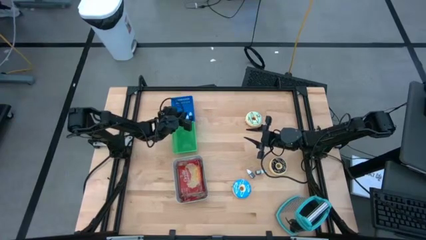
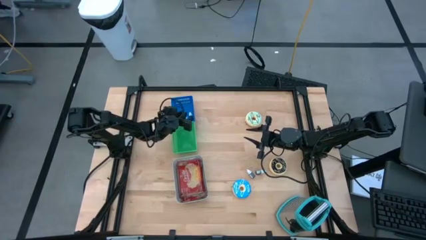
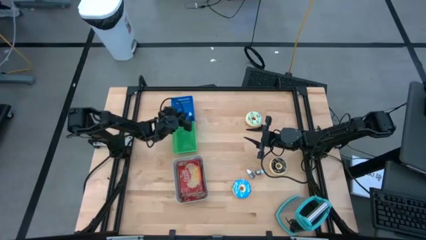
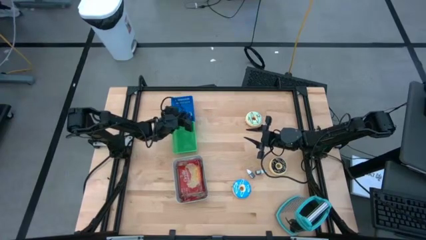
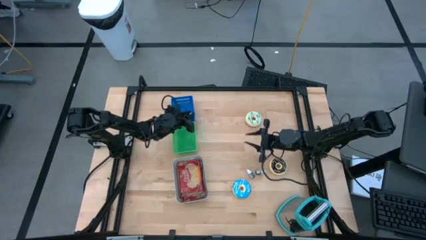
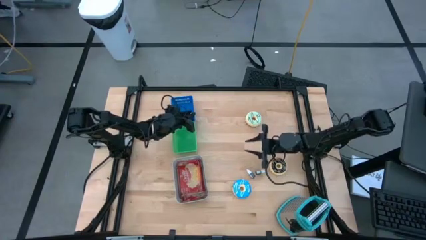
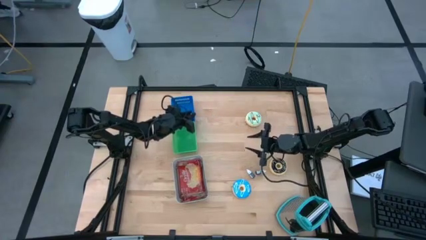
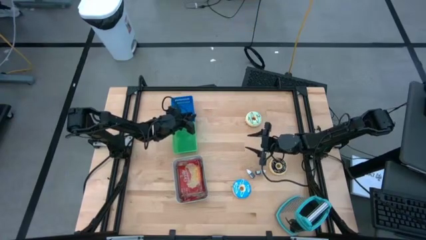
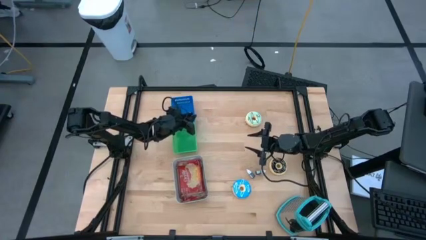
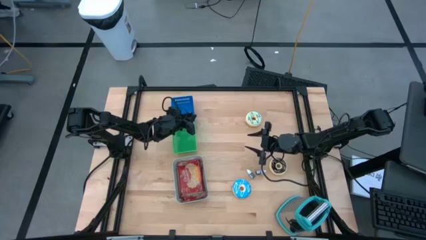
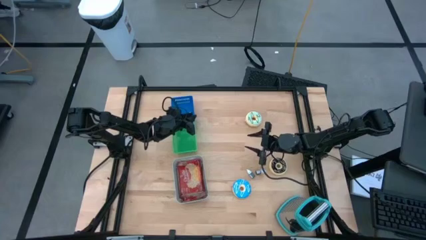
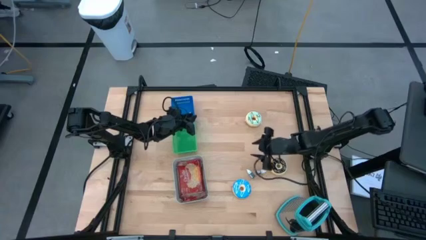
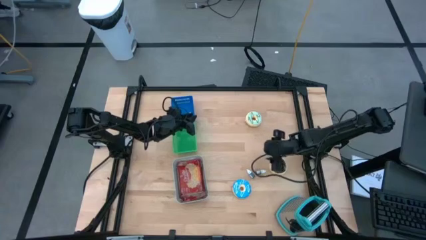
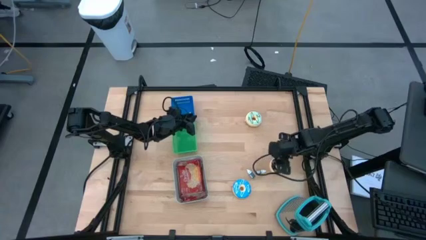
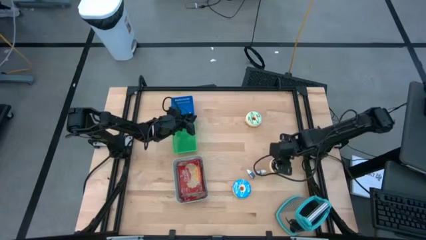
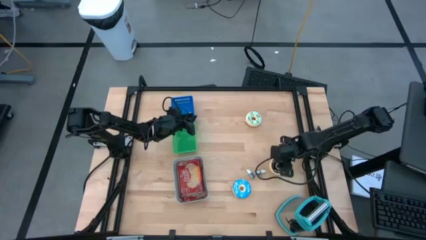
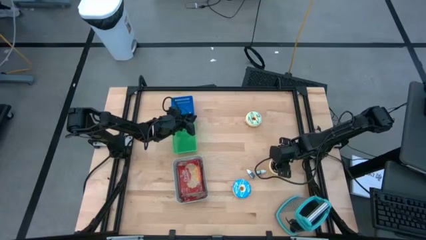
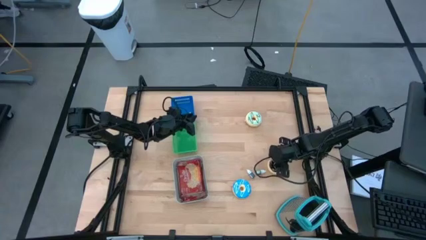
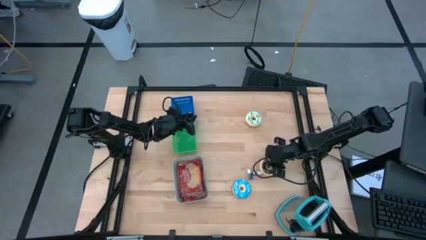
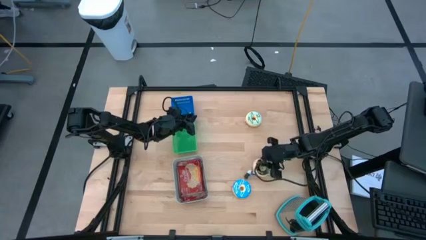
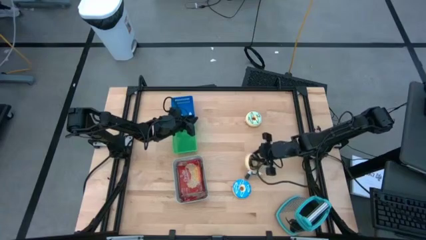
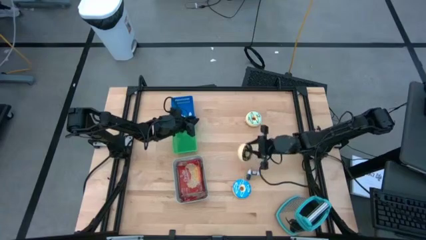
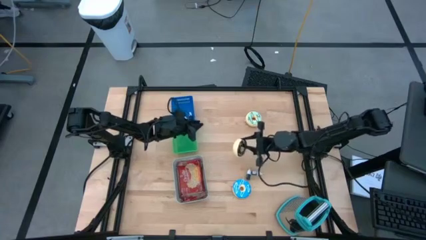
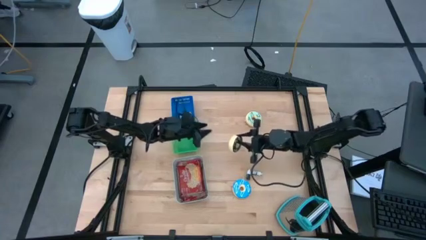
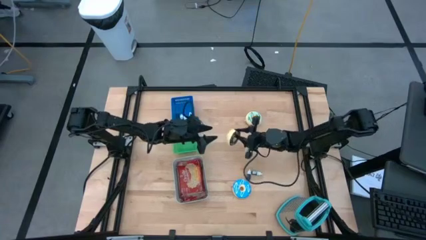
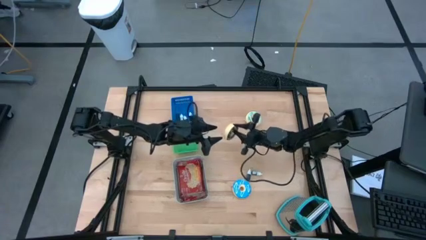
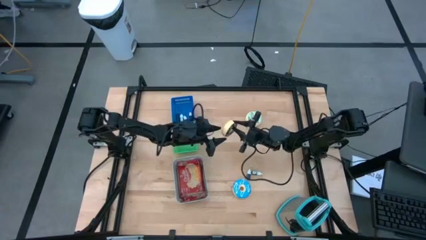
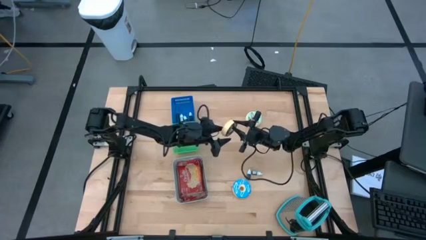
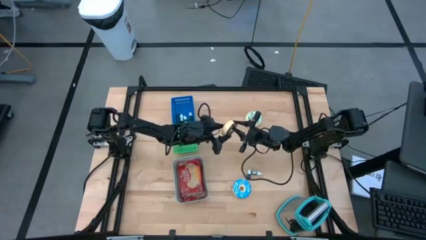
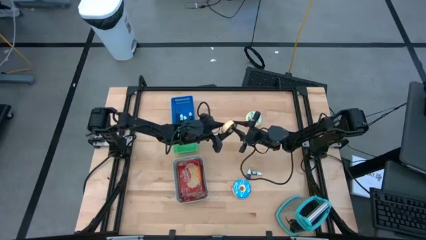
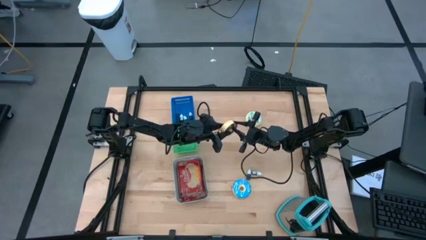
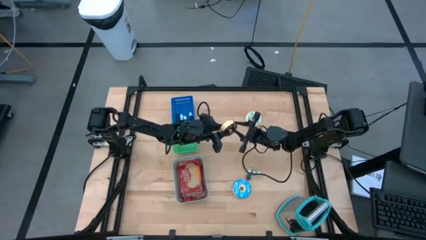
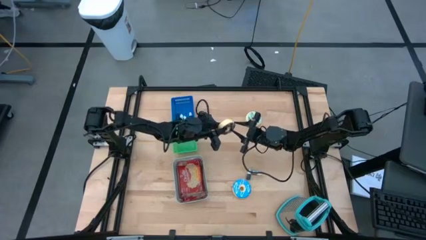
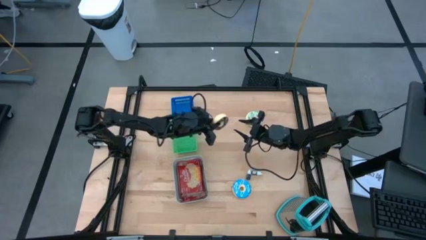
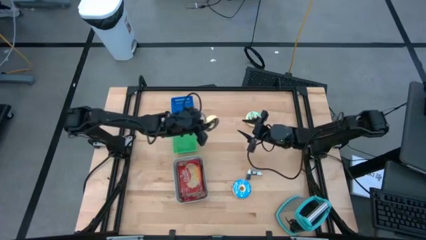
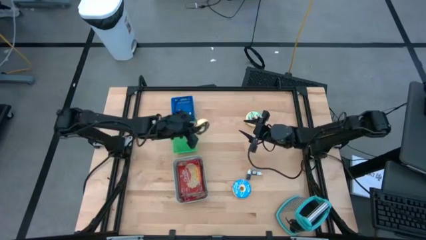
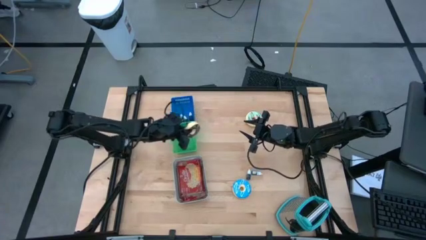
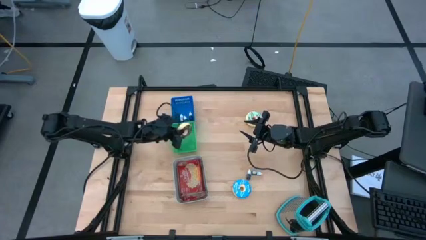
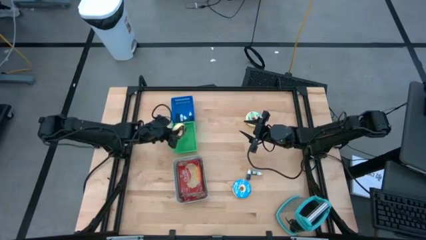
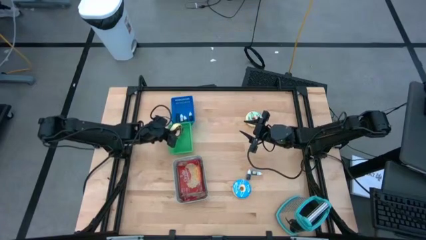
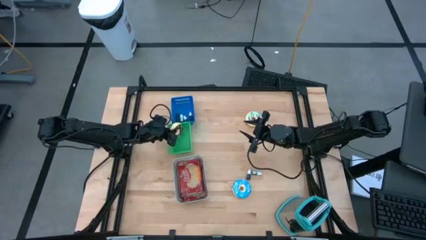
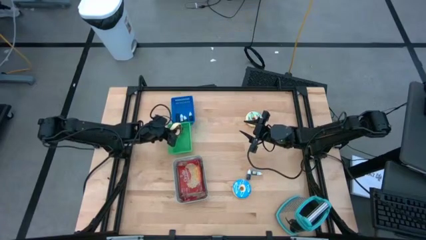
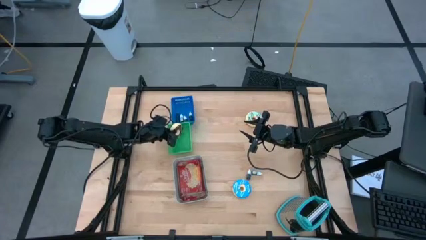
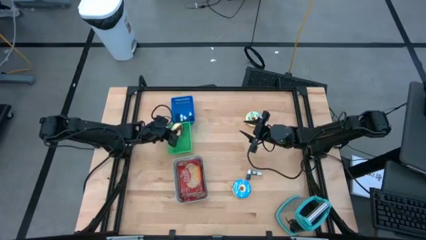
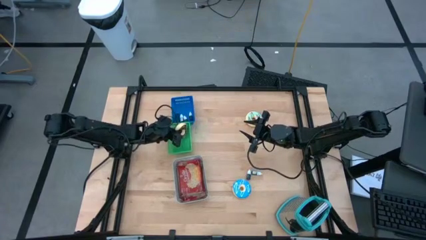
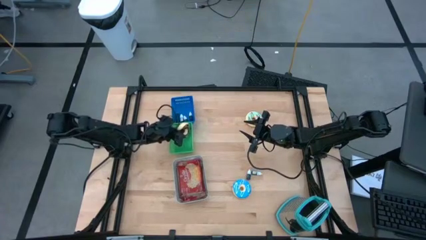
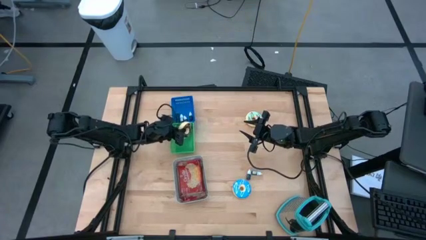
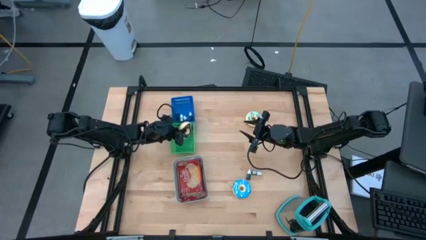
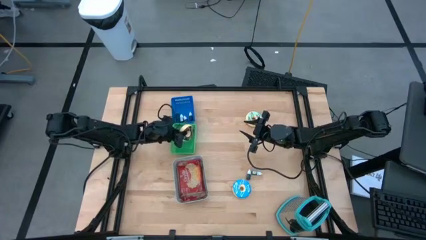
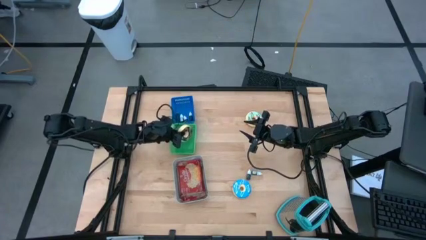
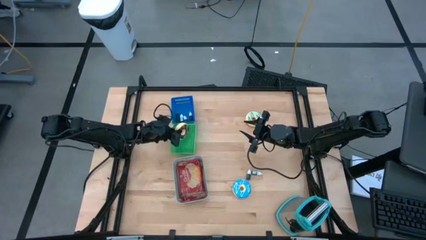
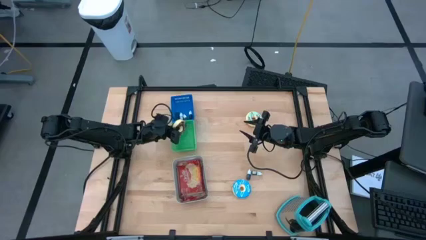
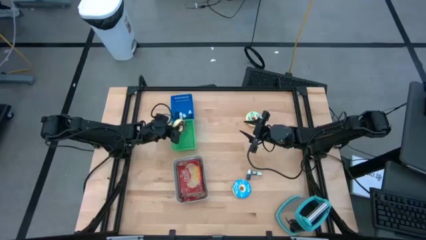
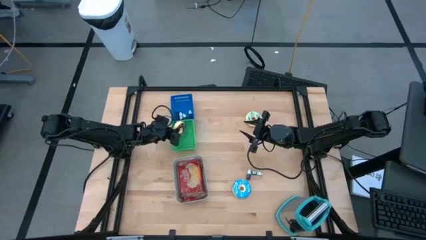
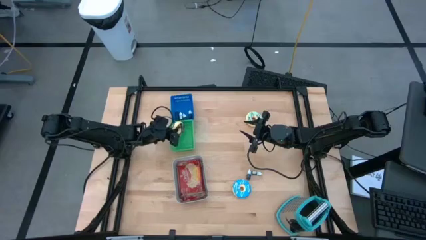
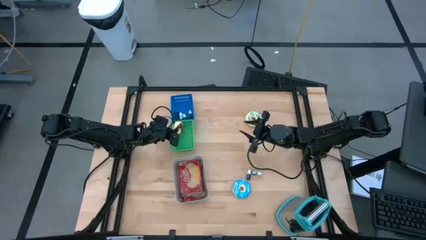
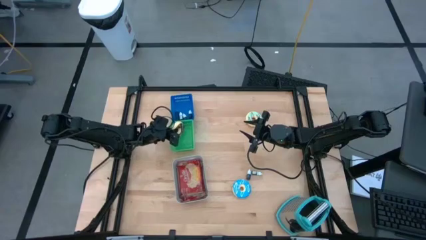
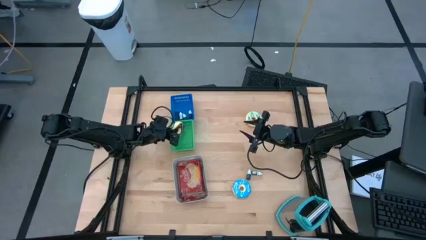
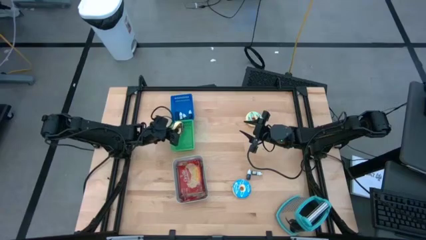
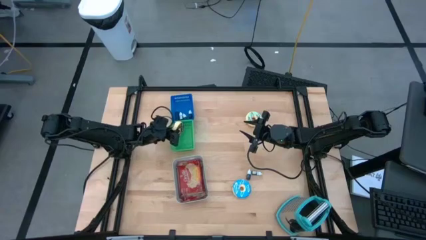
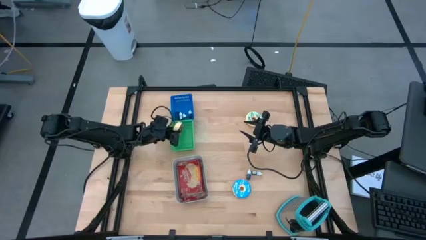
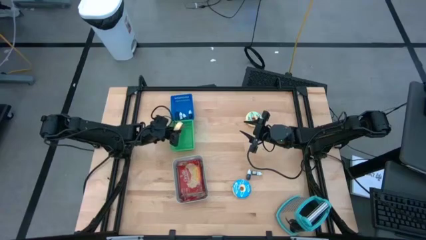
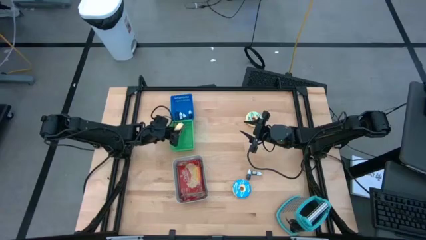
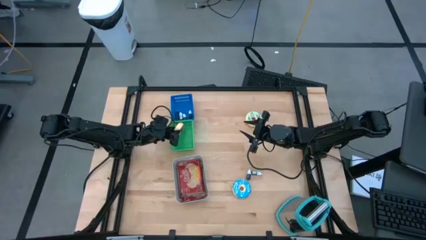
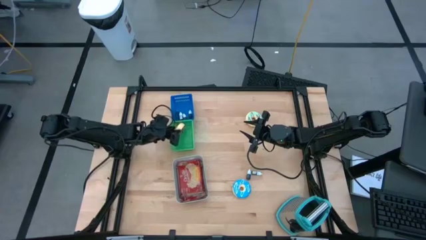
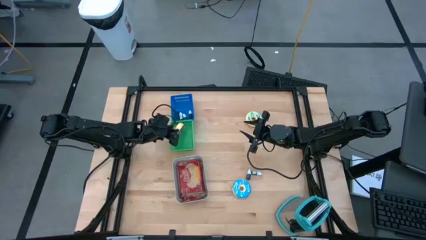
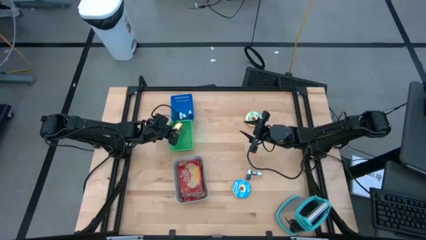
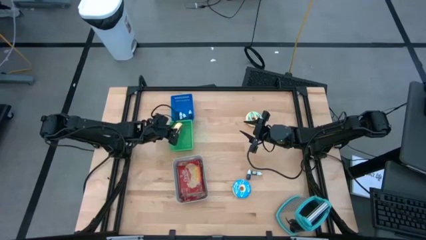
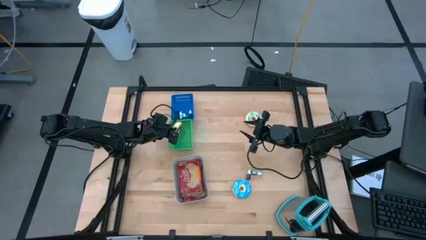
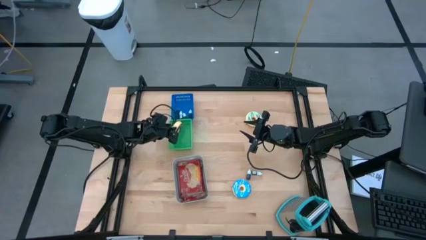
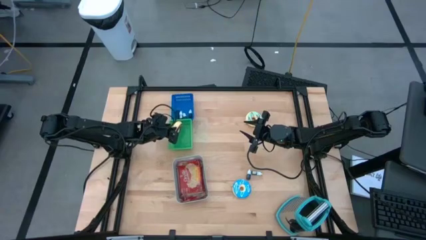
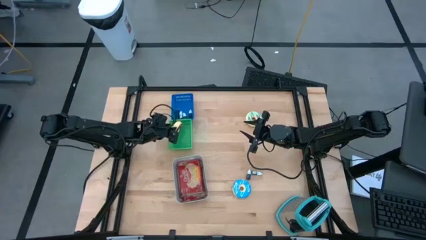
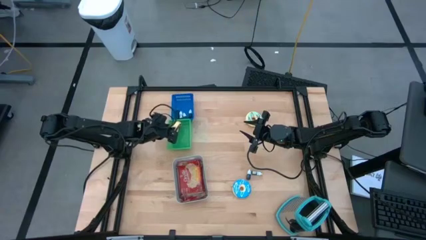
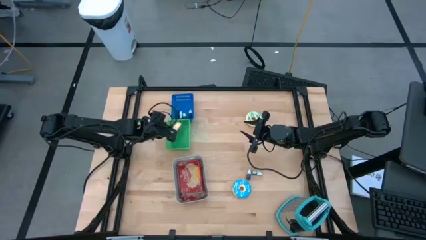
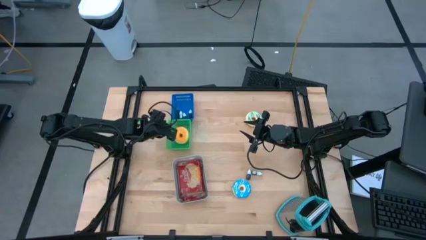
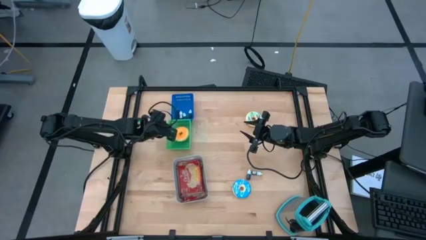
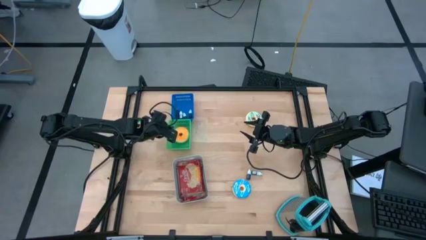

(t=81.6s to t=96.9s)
Task: Pick & Place Food Item
Put the black donut into the green bin

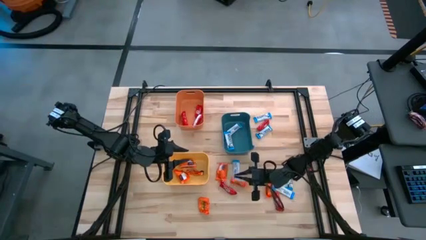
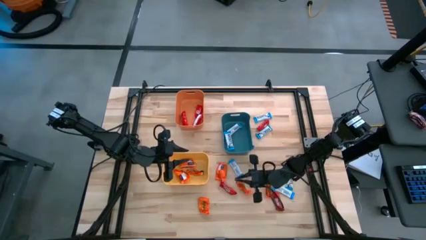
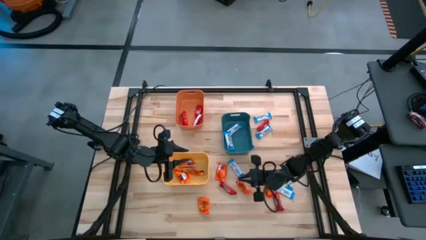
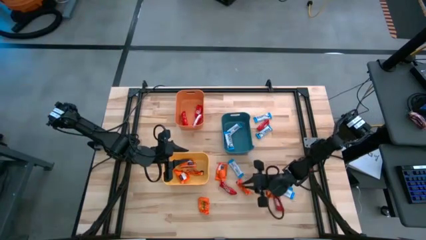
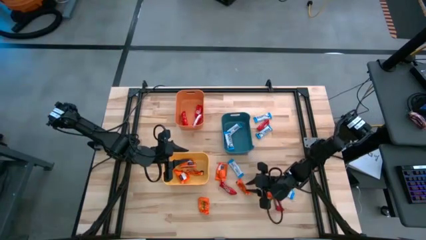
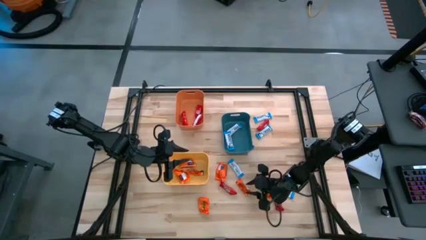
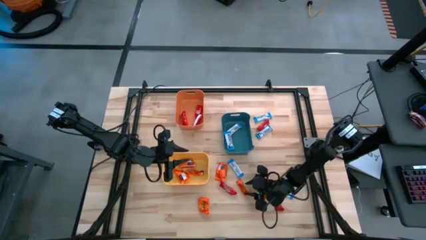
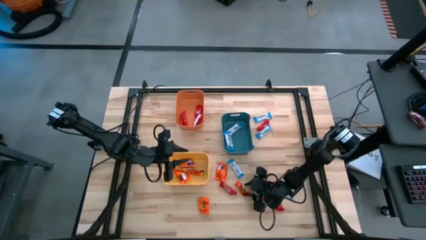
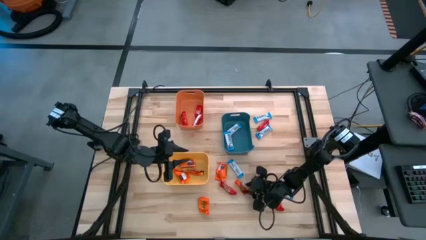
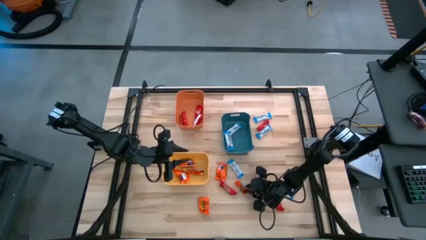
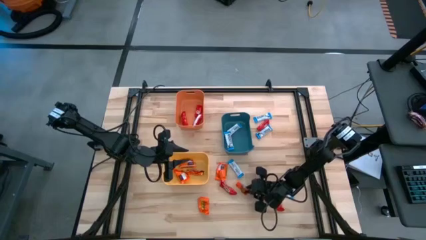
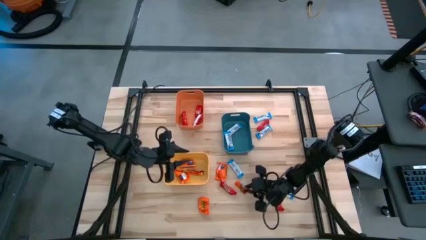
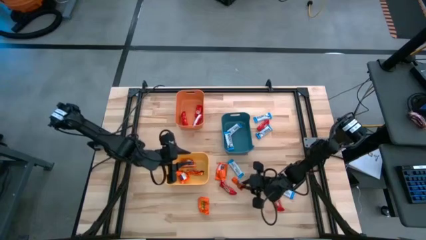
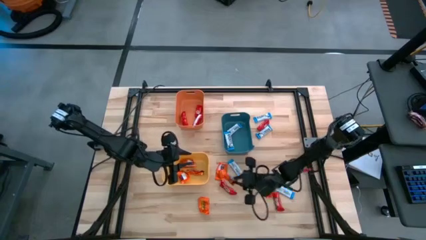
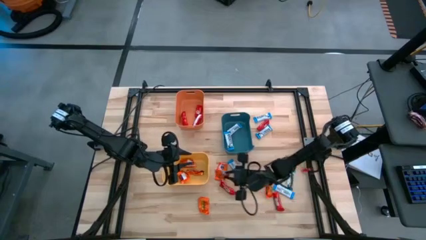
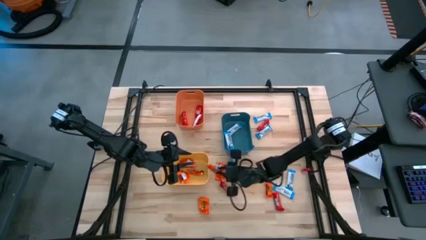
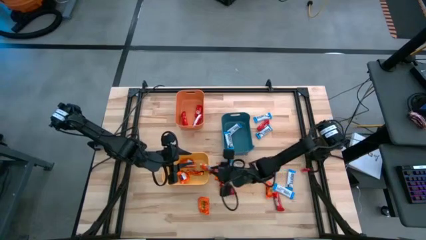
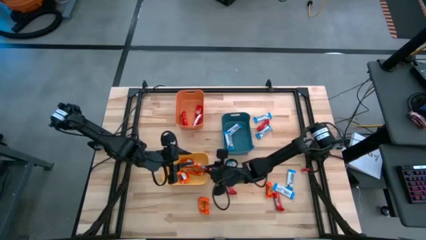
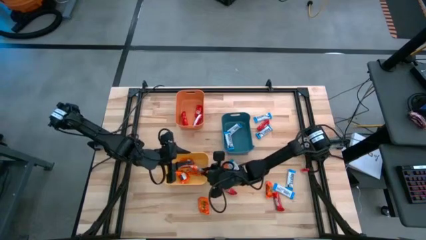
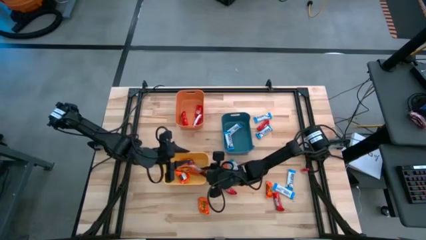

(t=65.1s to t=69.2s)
Task: Organize candy in baskets
Put the orange chocolate into the yellow bin
